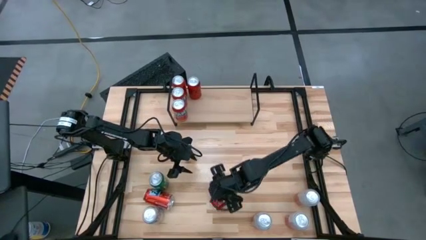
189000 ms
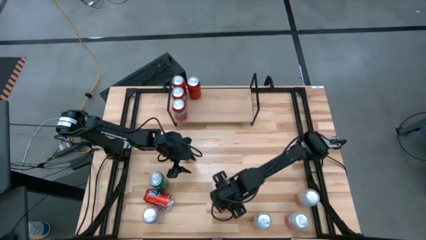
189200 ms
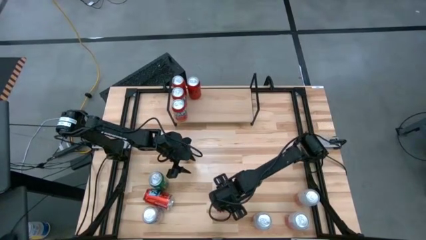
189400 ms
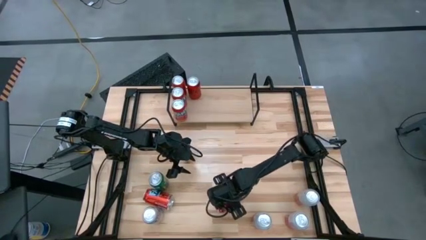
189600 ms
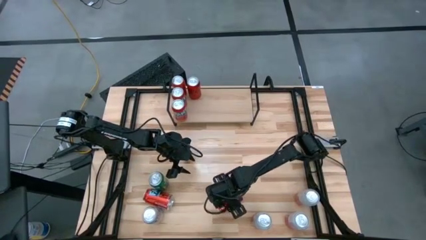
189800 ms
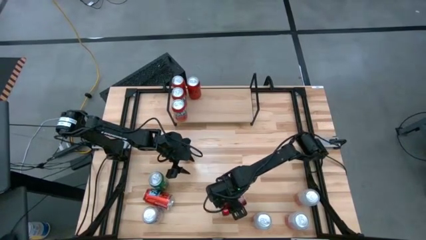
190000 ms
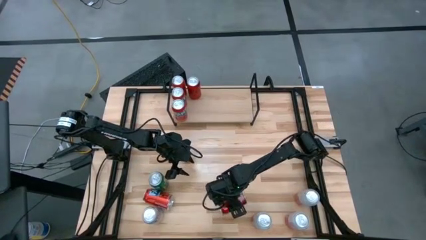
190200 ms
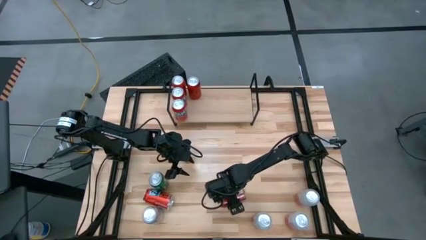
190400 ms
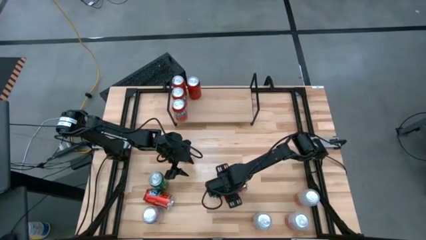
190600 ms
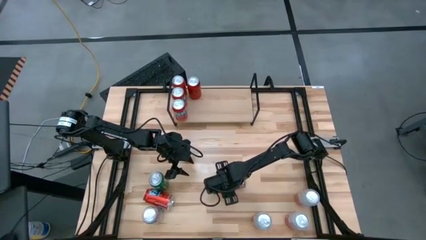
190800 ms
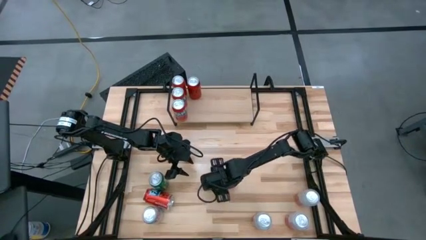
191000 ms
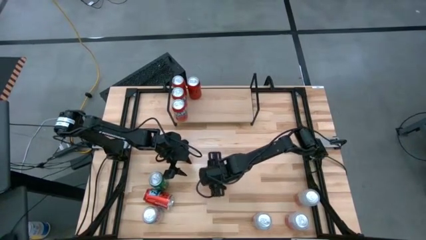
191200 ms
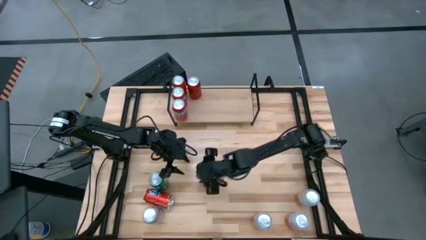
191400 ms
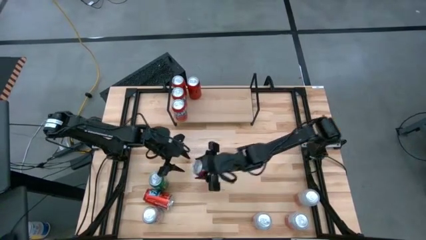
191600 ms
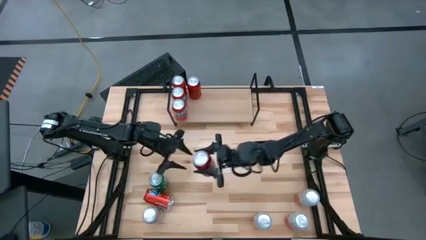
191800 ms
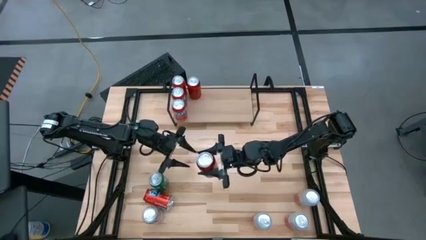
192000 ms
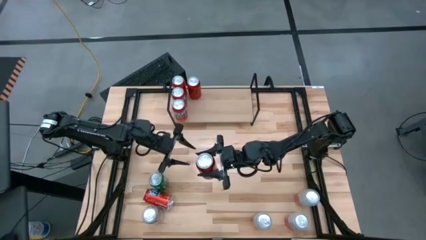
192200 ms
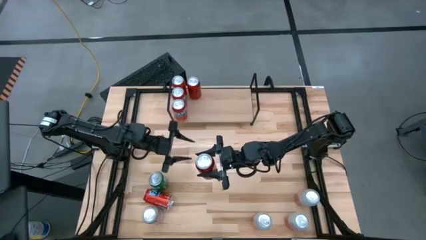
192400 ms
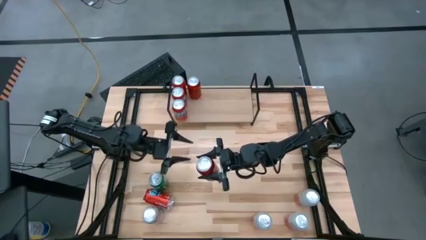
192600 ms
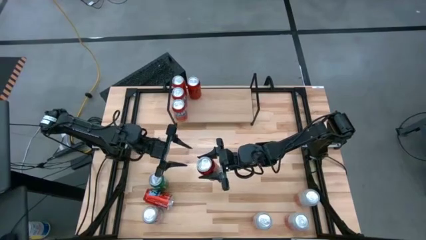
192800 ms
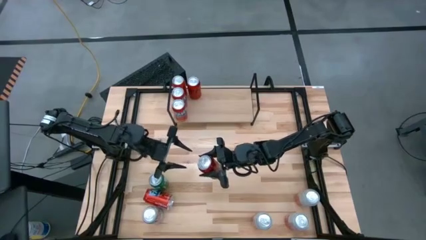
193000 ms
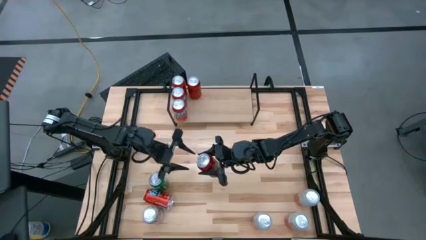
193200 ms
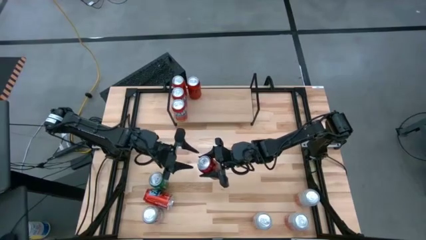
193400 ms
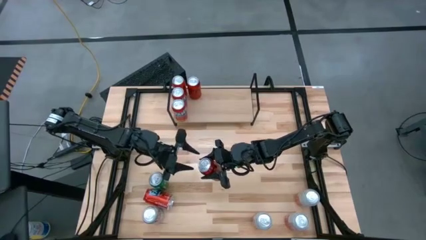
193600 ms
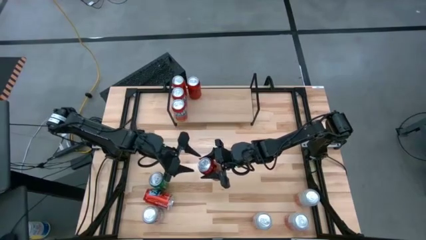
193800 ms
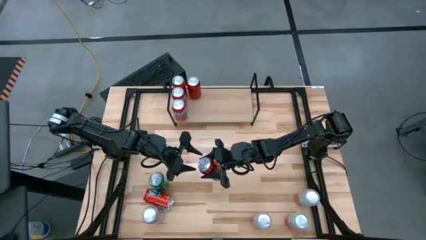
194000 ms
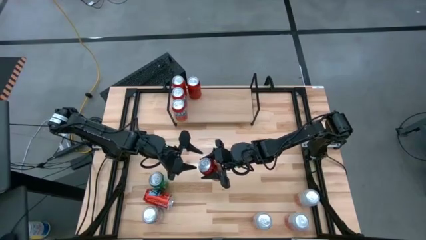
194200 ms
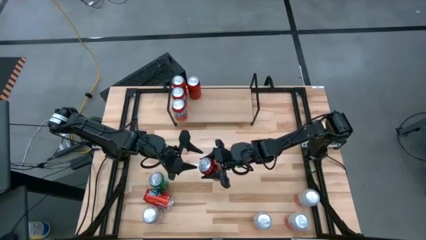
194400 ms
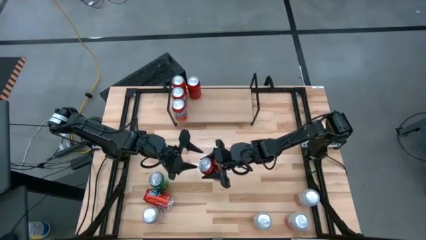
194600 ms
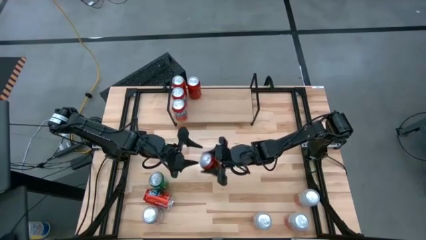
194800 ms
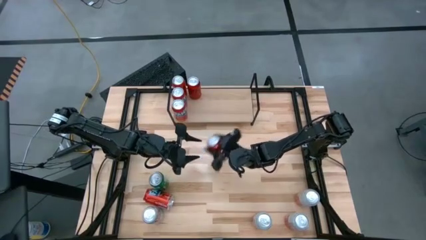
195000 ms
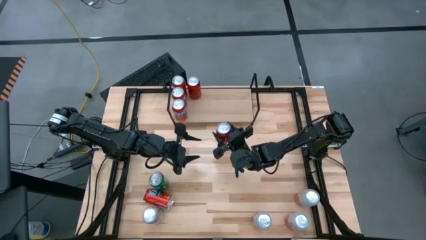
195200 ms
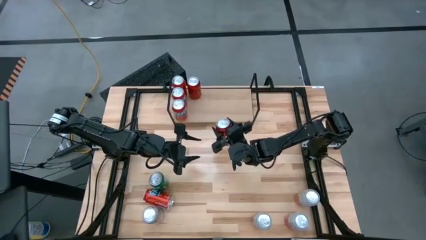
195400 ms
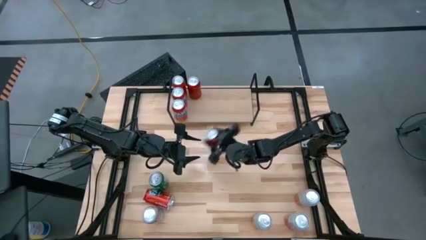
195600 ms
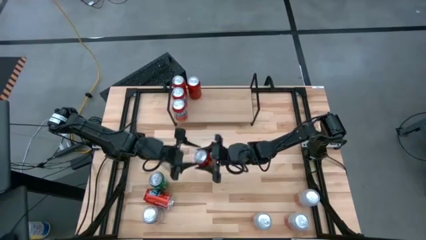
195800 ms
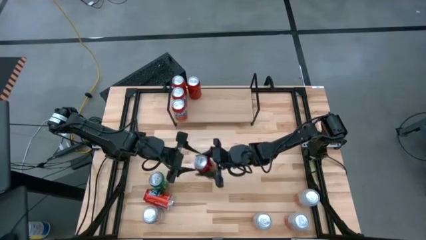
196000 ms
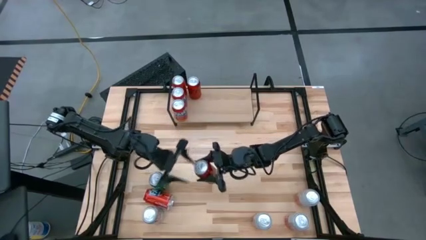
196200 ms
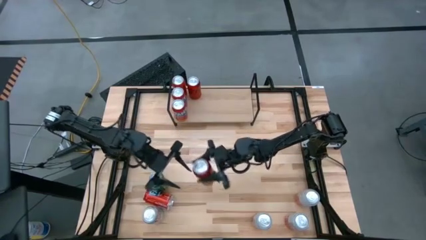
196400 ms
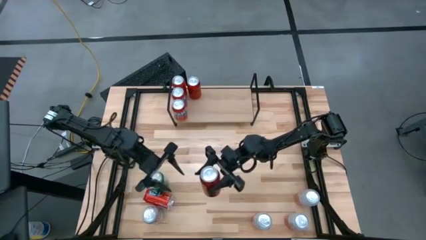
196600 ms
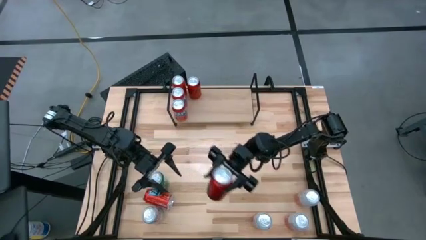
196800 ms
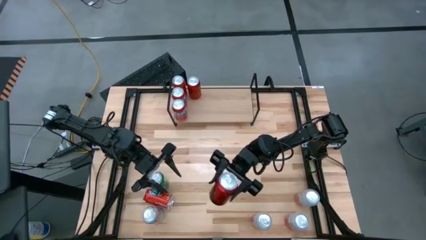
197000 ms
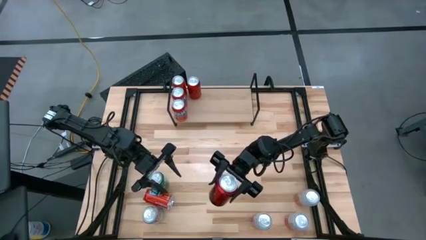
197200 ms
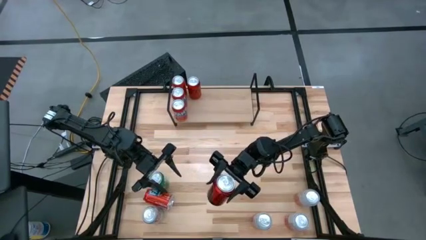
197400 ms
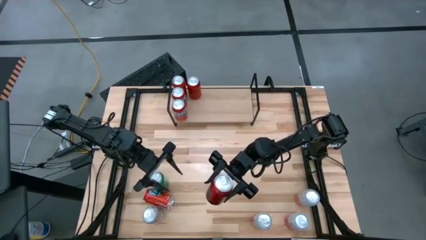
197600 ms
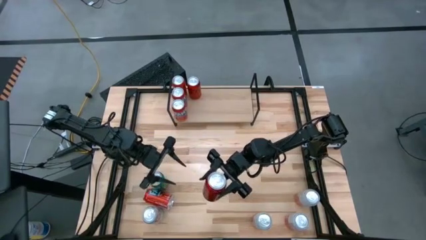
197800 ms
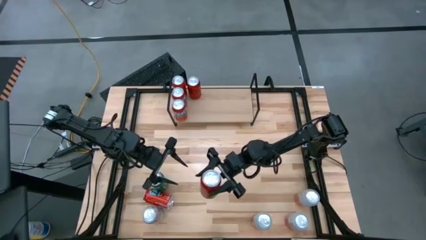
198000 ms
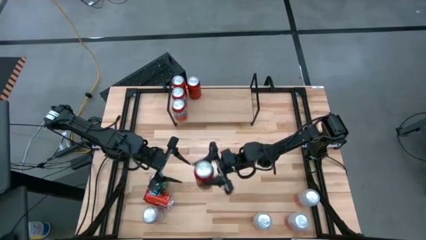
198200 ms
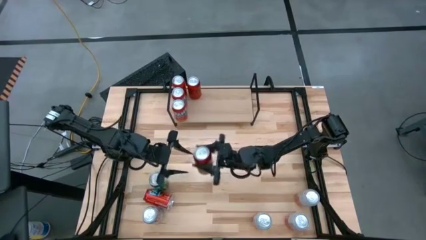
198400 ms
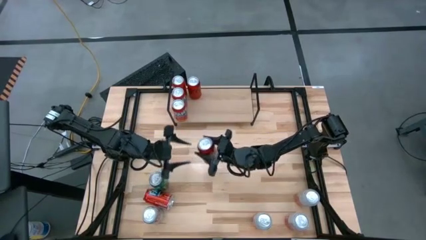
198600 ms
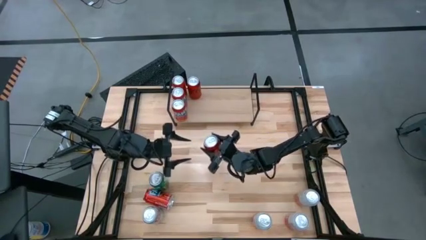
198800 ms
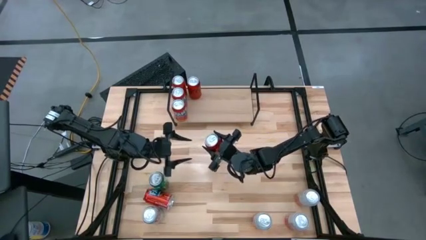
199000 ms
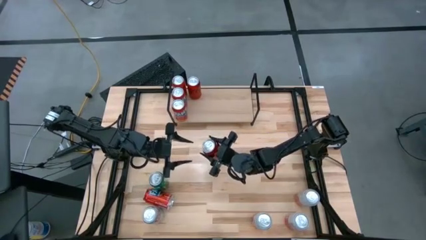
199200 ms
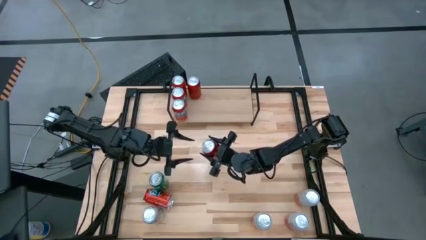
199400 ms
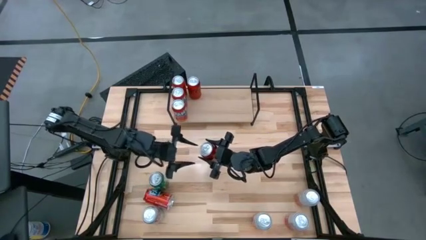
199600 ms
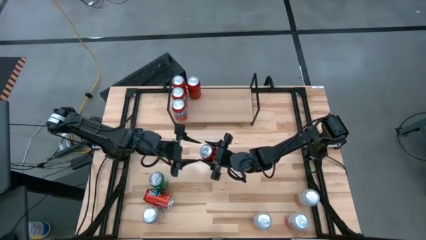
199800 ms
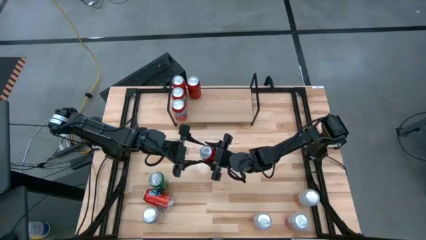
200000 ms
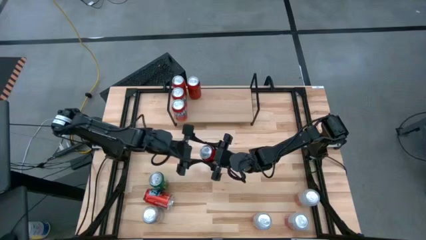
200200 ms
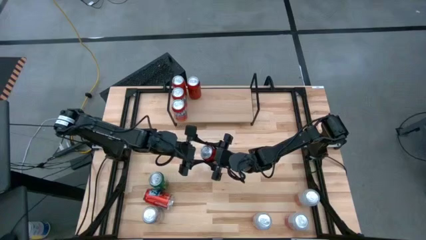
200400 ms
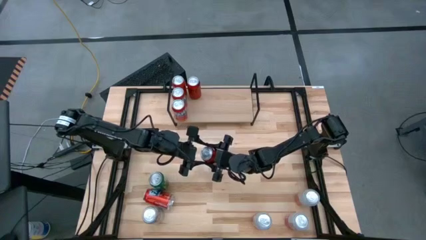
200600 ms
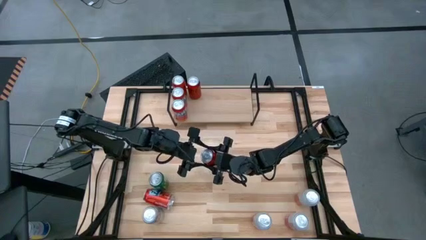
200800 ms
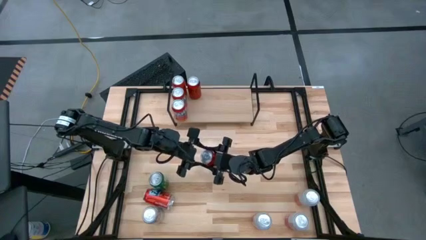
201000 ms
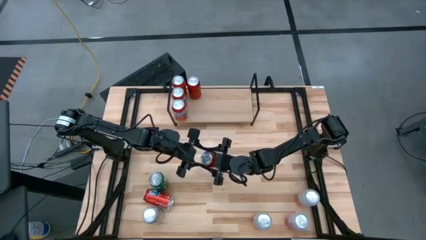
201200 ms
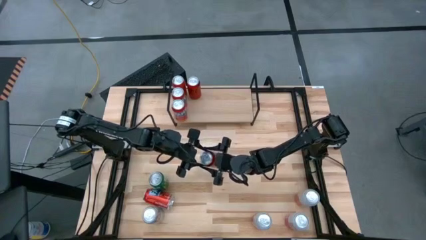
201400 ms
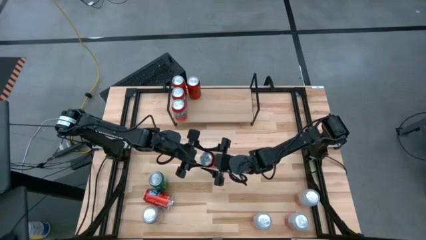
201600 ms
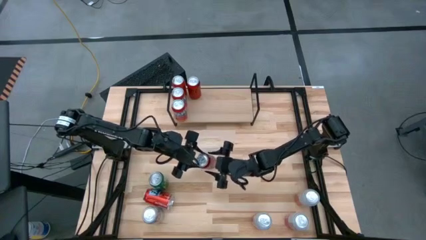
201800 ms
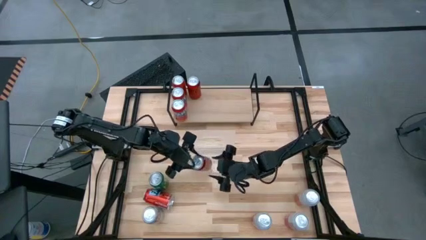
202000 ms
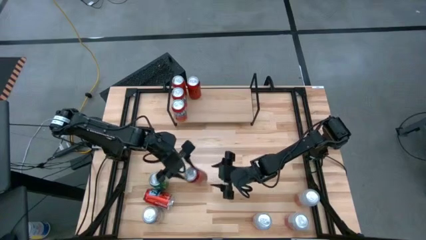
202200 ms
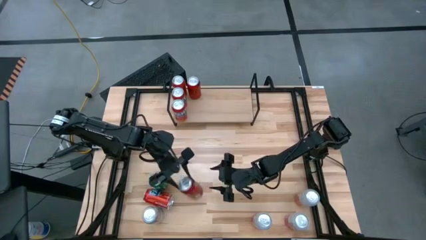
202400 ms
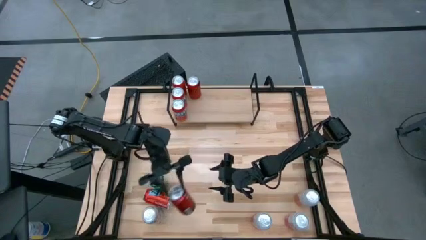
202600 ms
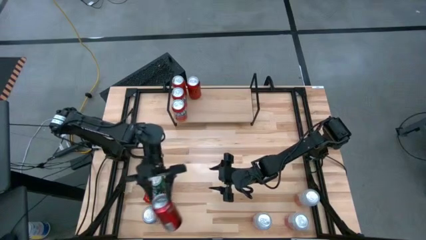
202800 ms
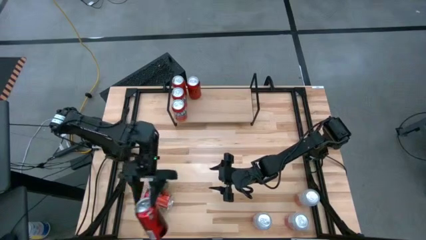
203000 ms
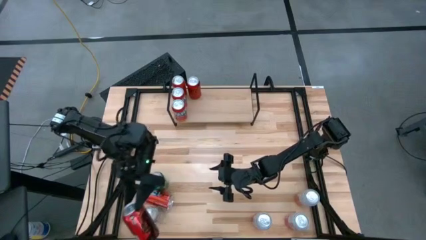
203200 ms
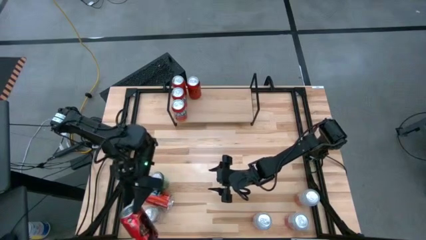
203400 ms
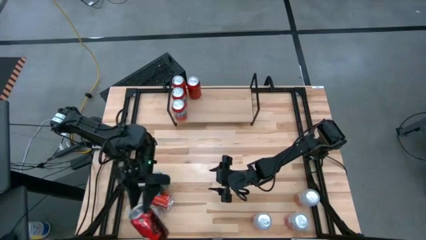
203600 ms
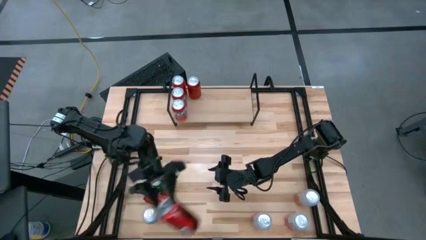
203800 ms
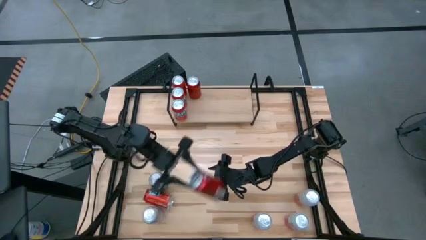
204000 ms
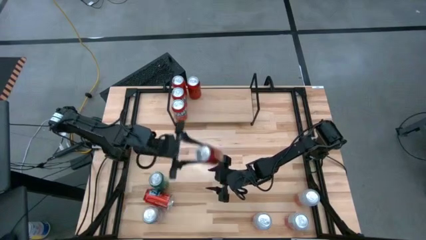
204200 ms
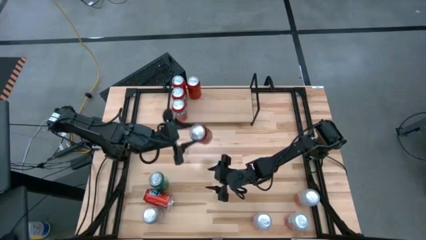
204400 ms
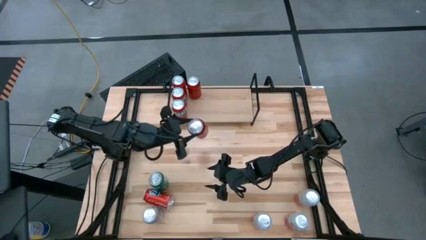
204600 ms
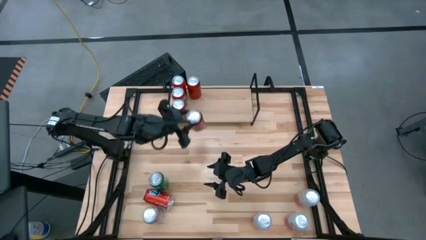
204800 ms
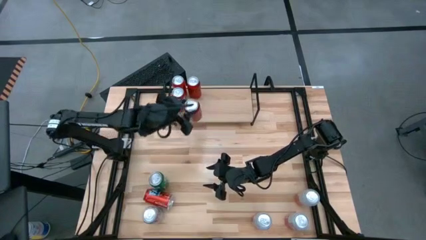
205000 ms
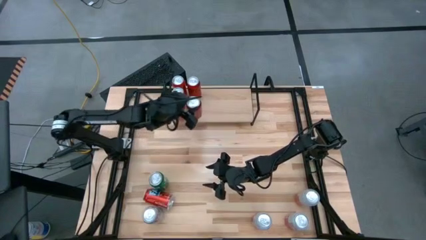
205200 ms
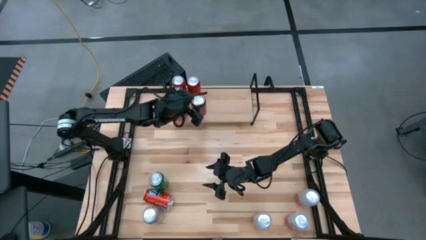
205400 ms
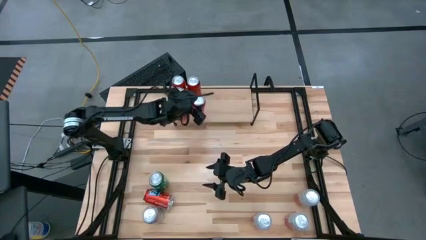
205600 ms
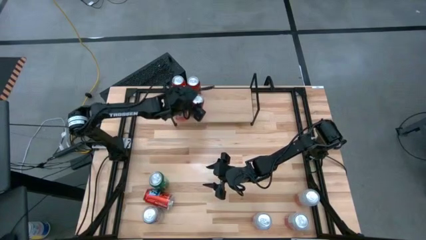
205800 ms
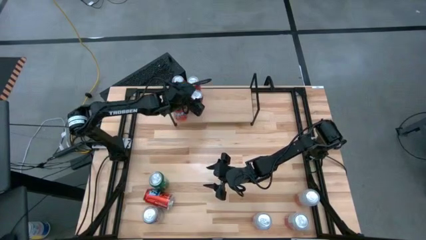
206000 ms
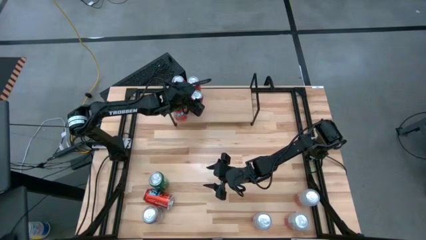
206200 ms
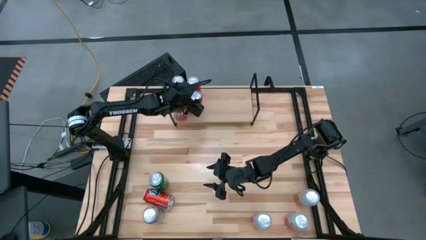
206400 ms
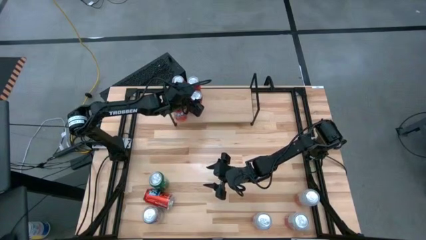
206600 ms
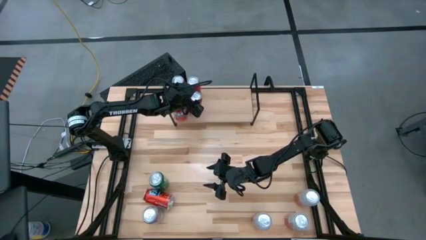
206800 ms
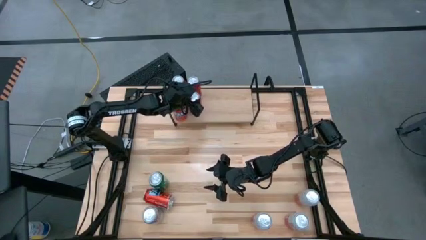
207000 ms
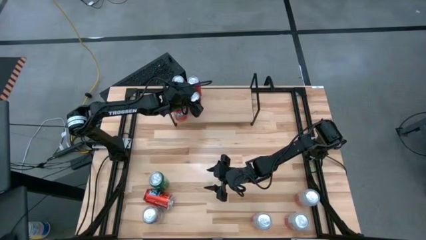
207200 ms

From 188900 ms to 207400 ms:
Task: Place canned beverage on shelf
Put the red black soda can on the shelf and align with the other red black soda cans
